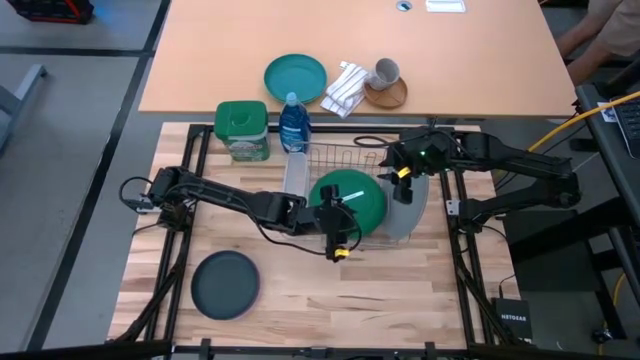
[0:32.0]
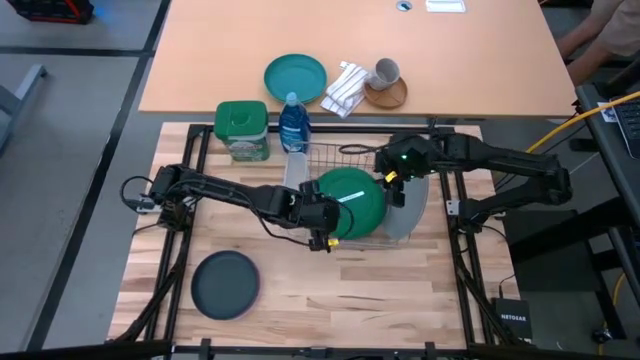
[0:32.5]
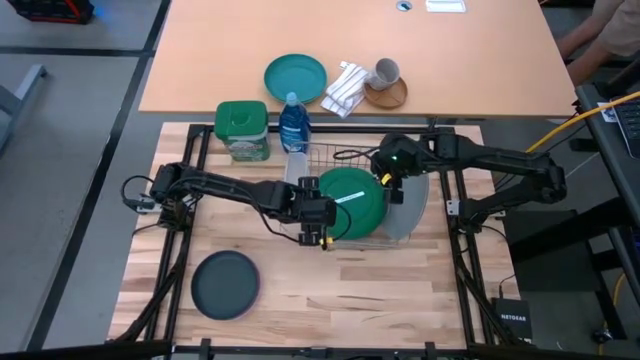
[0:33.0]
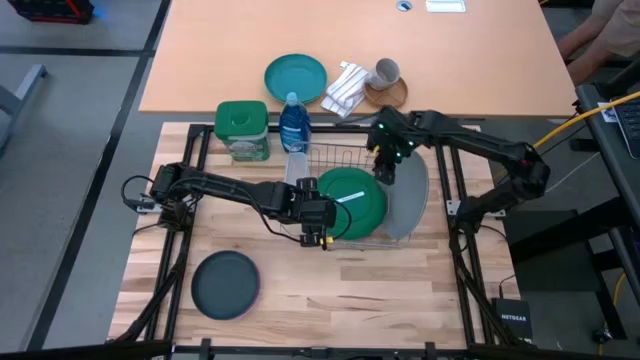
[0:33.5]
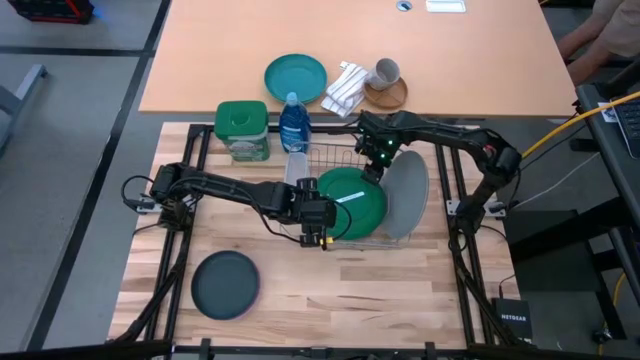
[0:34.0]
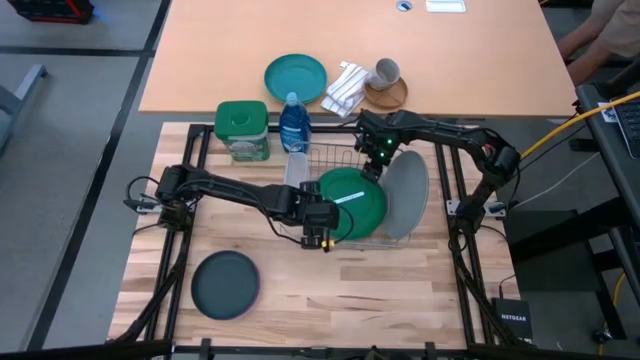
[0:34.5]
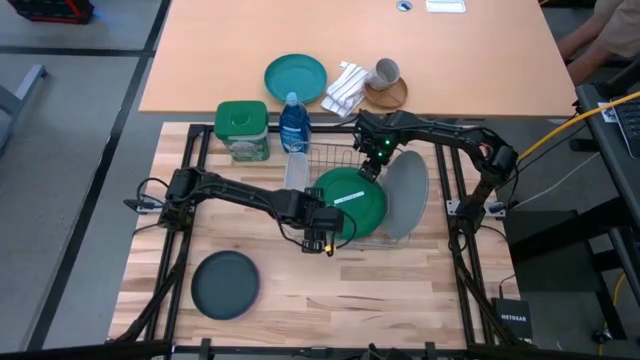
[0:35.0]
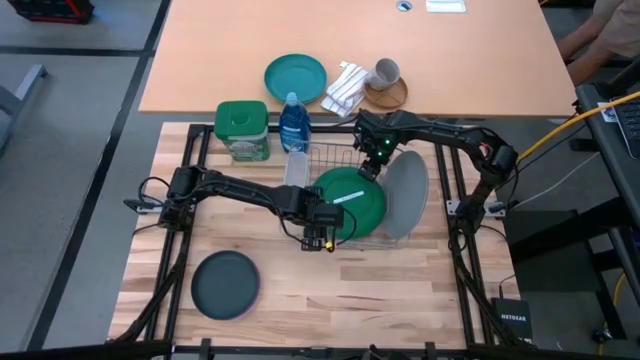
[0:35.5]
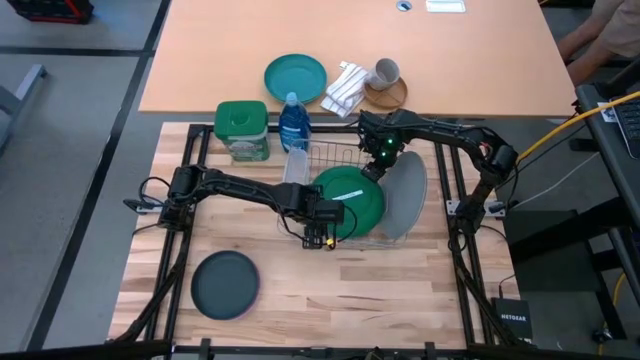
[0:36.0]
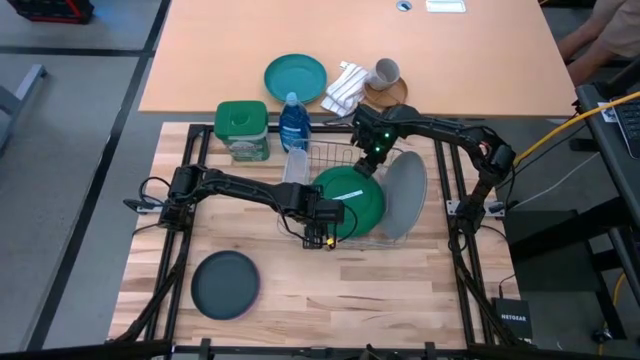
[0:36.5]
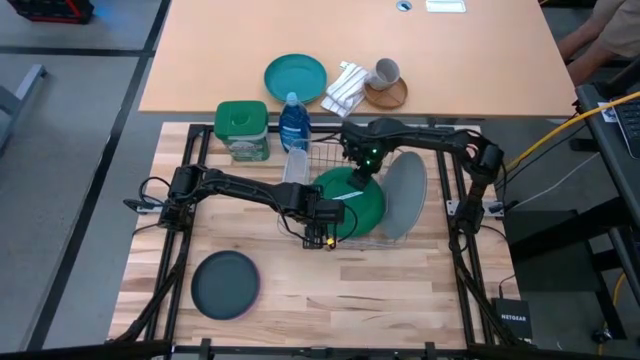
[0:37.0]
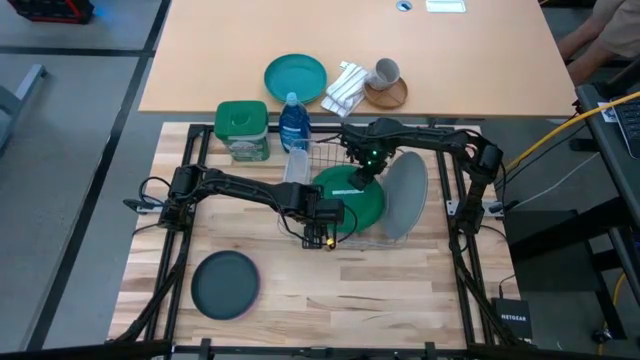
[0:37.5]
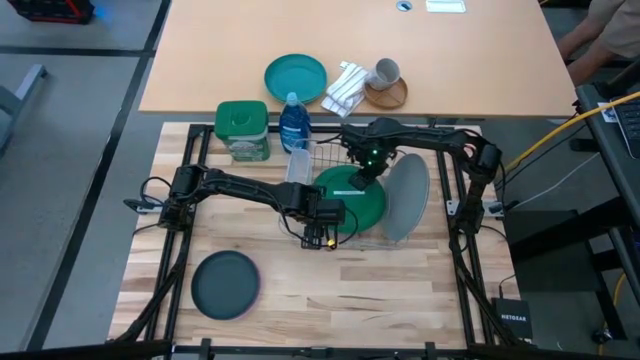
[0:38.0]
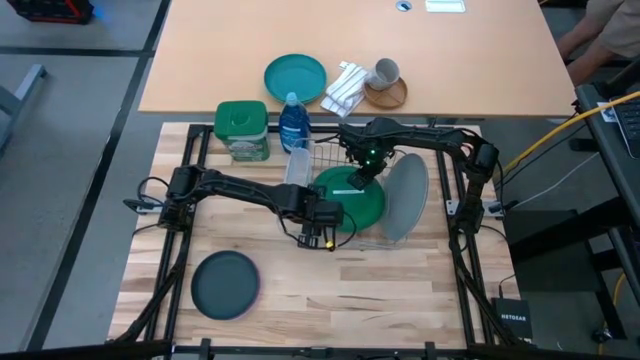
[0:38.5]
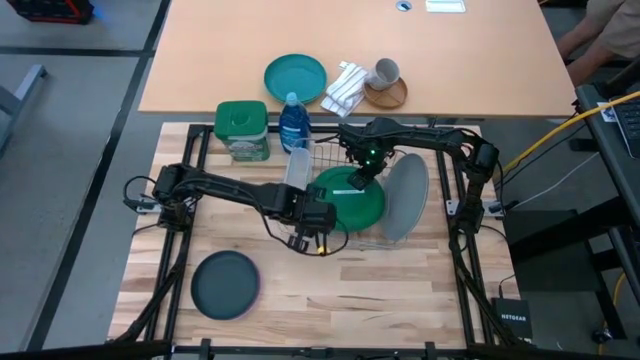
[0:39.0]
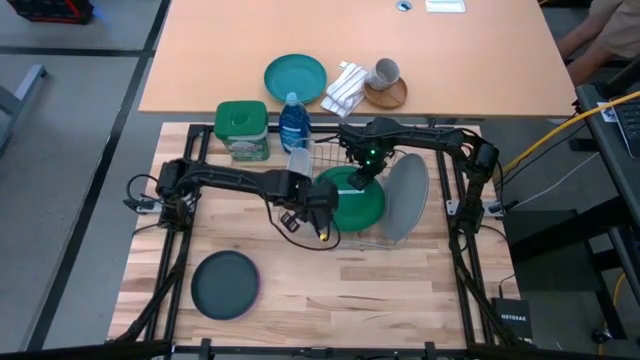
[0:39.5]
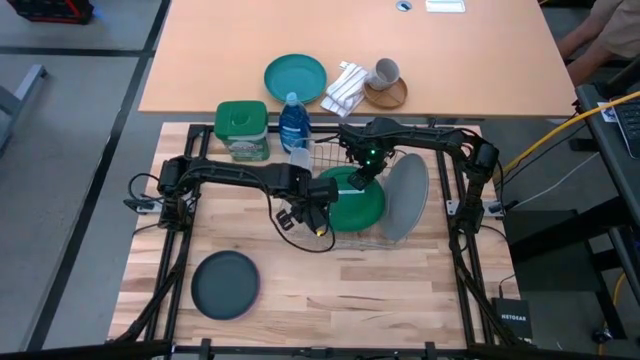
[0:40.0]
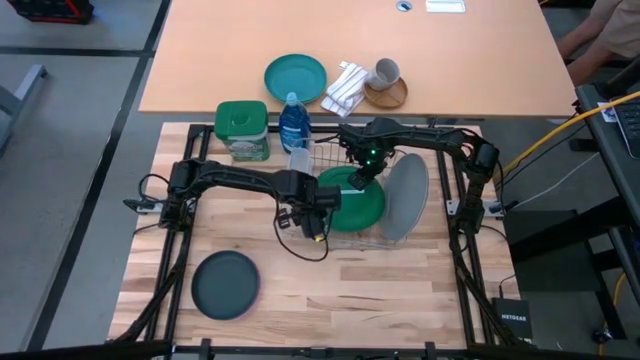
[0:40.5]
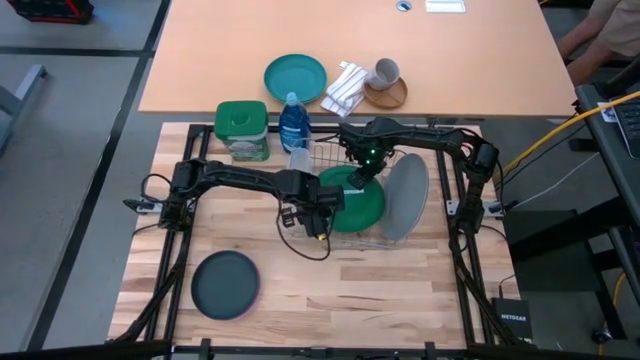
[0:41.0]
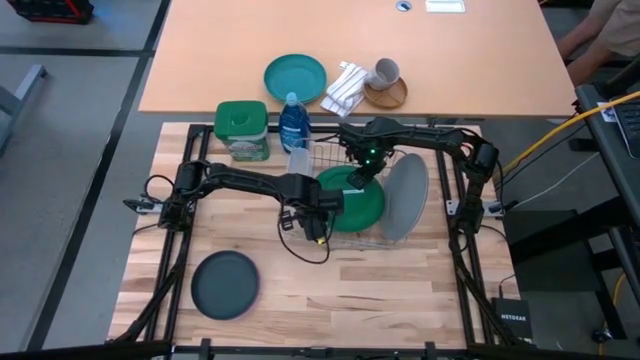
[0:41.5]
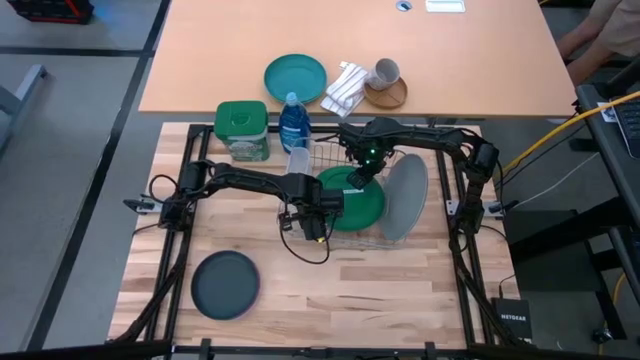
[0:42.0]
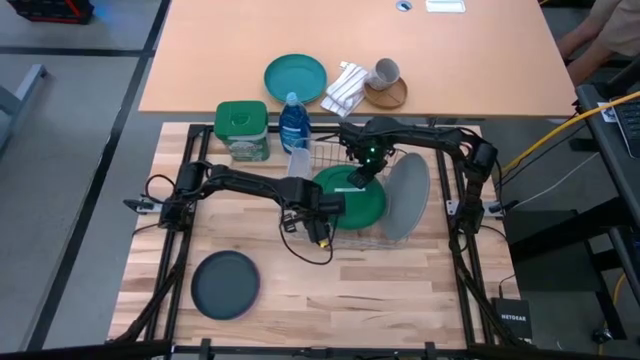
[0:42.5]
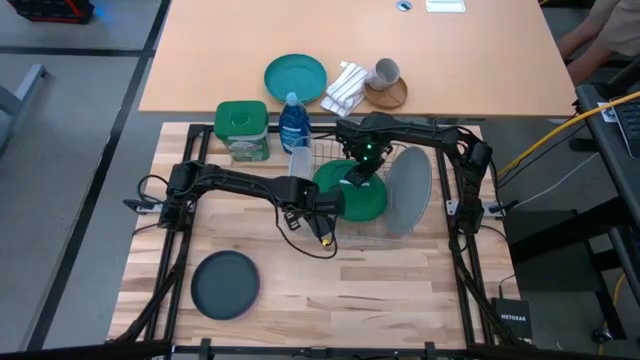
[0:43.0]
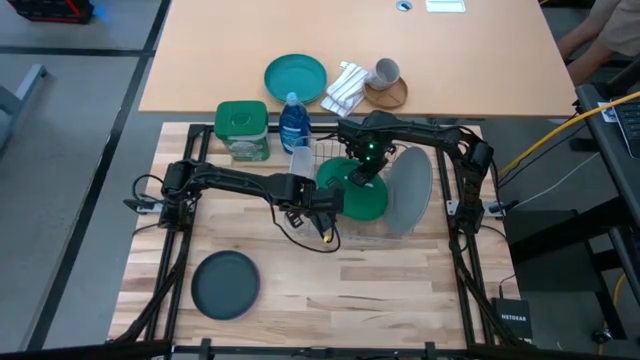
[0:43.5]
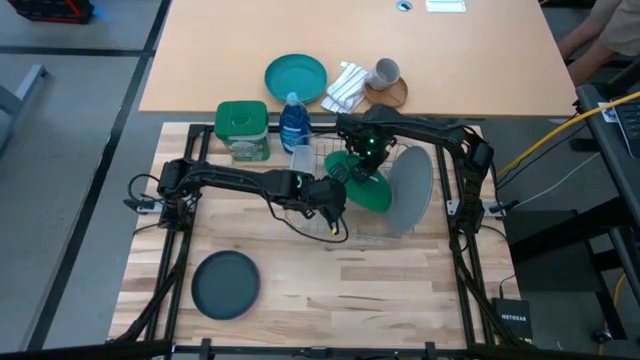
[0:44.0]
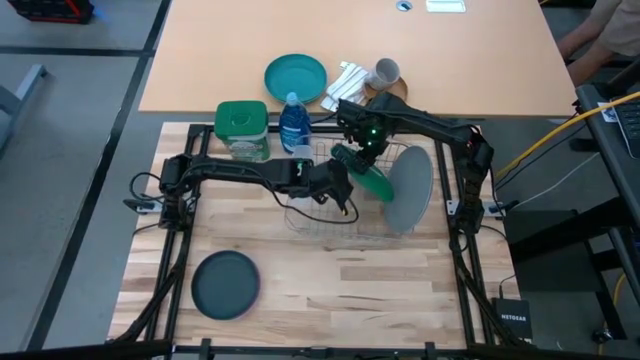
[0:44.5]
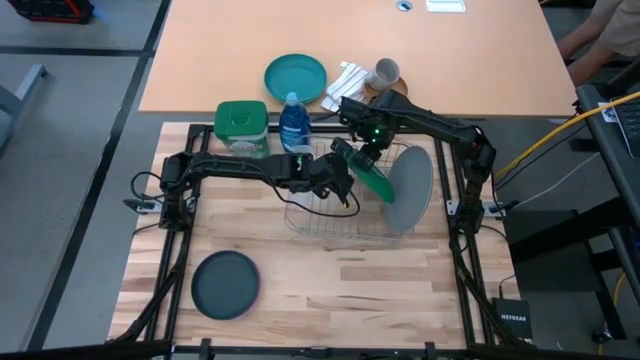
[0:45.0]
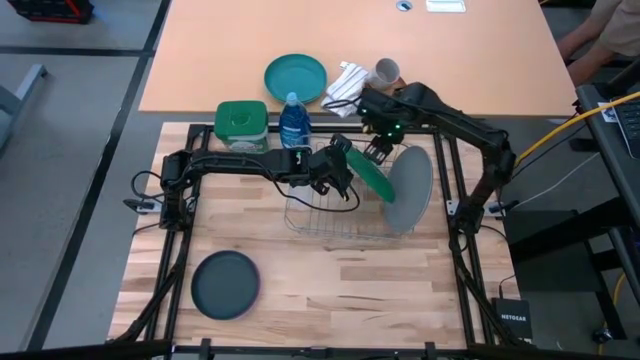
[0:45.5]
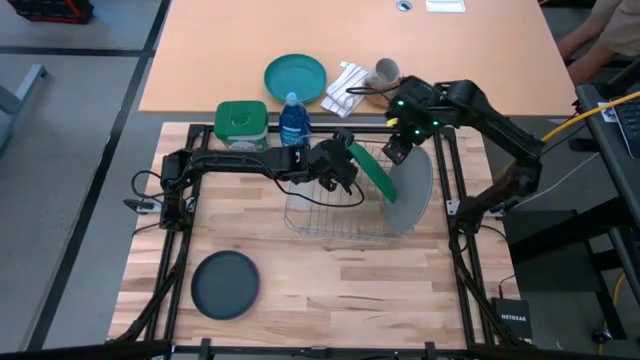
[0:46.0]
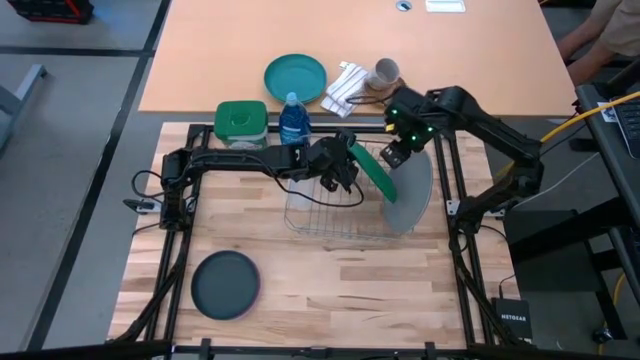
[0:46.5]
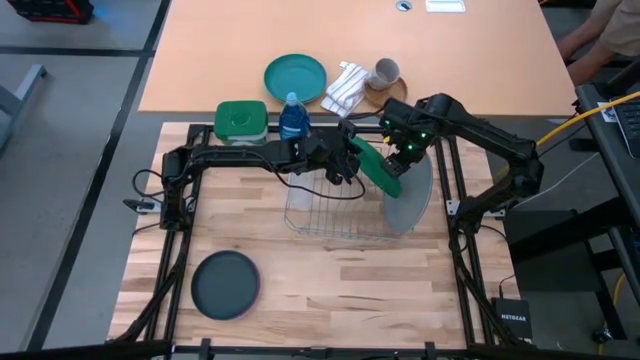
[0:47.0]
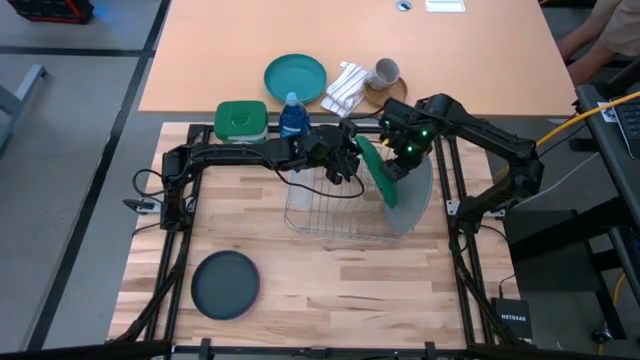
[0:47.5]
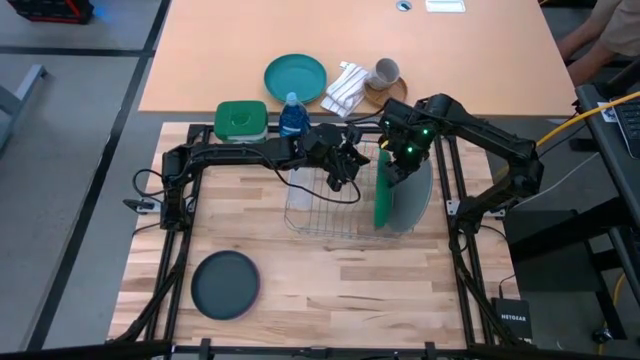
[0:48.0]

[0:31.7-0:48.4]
Task: Sort dishes
Put the green plate into the dish rack
